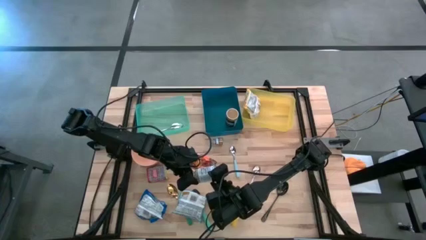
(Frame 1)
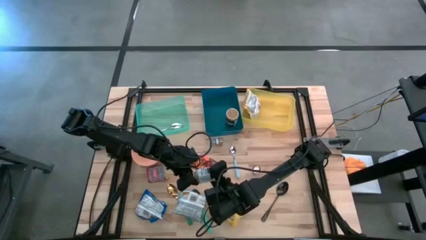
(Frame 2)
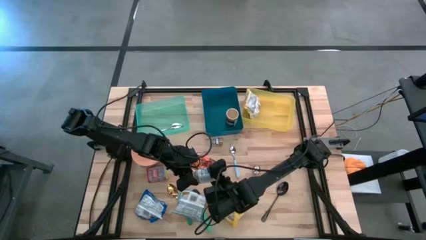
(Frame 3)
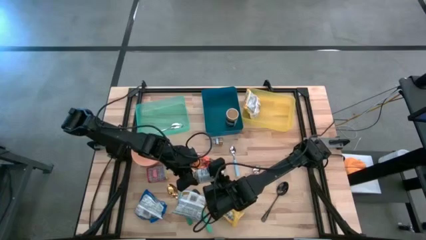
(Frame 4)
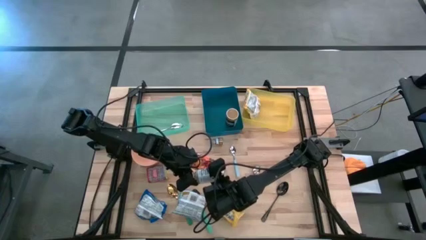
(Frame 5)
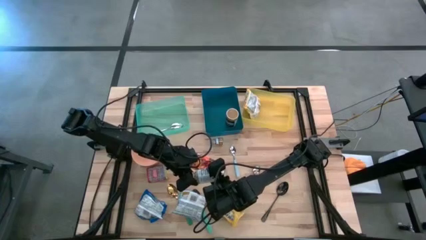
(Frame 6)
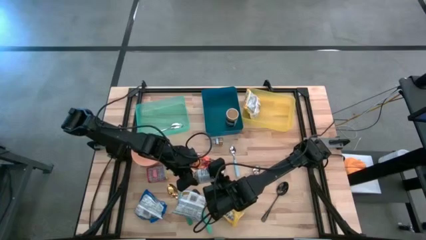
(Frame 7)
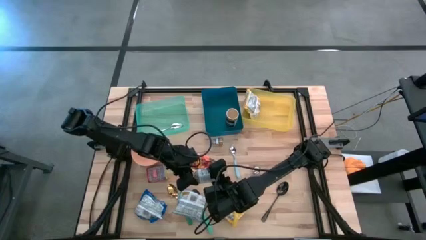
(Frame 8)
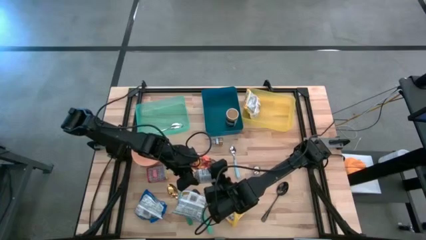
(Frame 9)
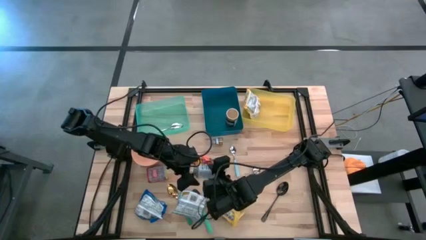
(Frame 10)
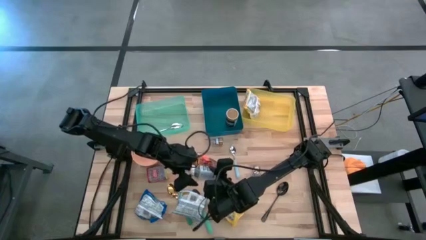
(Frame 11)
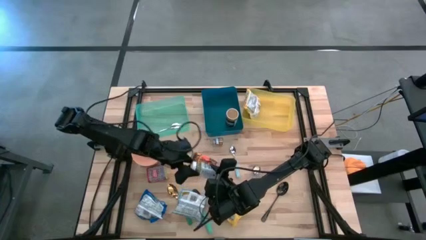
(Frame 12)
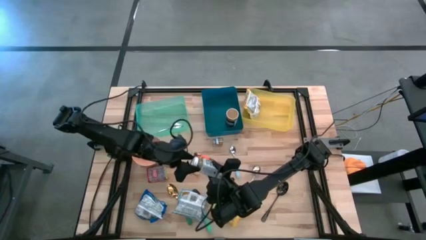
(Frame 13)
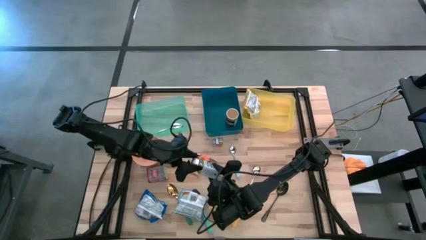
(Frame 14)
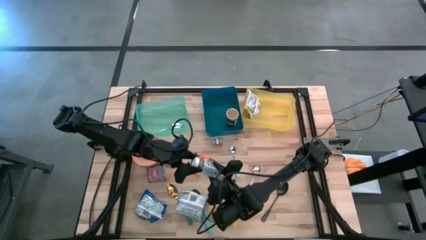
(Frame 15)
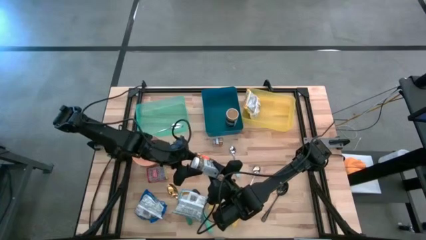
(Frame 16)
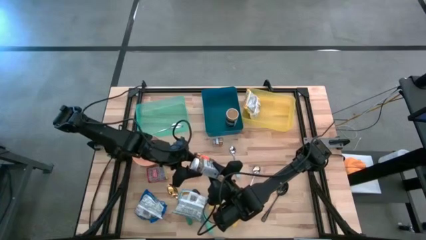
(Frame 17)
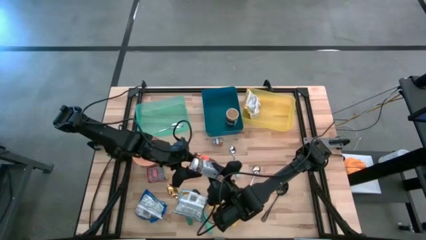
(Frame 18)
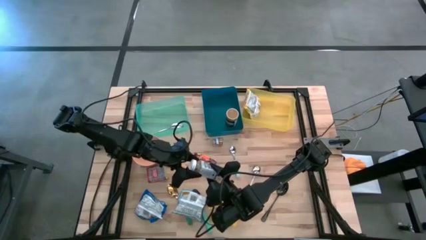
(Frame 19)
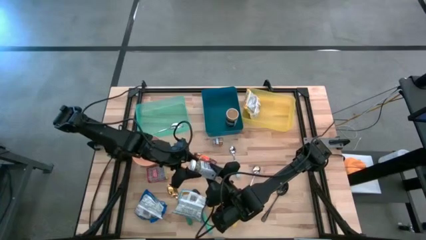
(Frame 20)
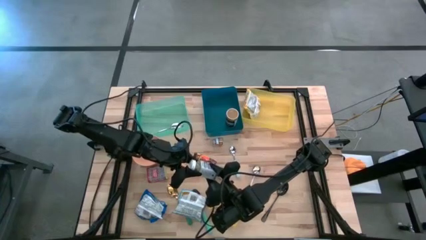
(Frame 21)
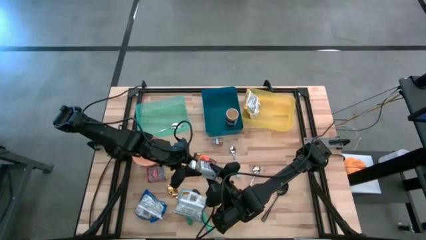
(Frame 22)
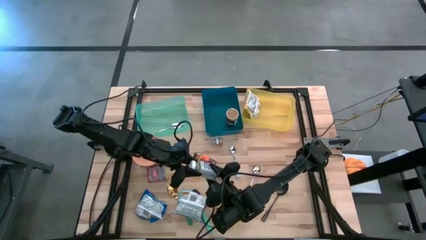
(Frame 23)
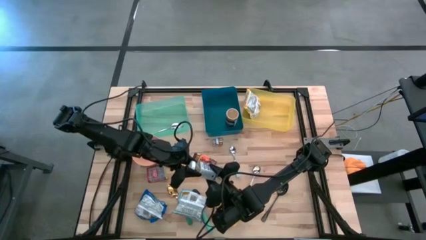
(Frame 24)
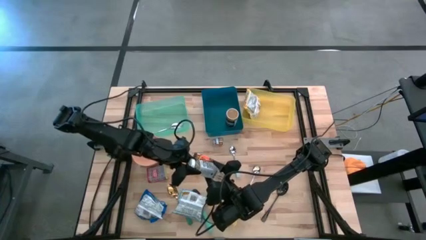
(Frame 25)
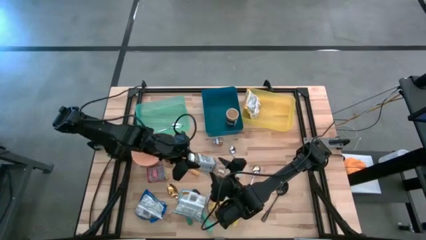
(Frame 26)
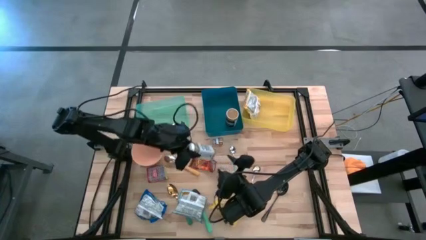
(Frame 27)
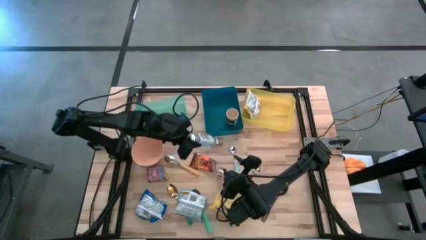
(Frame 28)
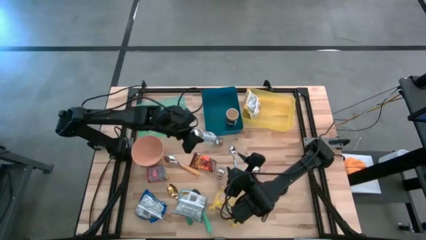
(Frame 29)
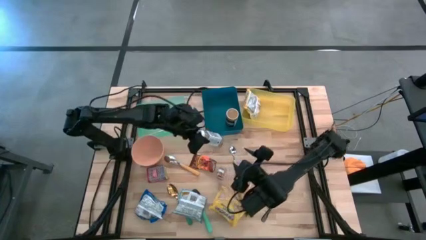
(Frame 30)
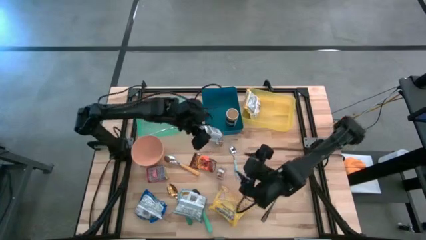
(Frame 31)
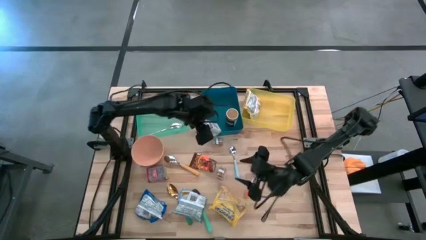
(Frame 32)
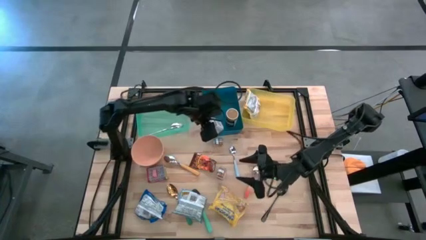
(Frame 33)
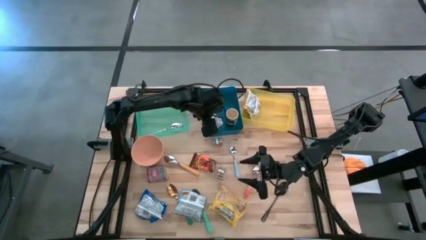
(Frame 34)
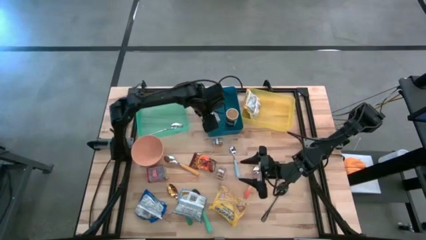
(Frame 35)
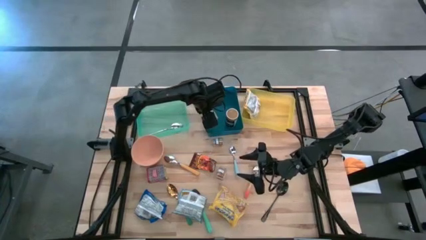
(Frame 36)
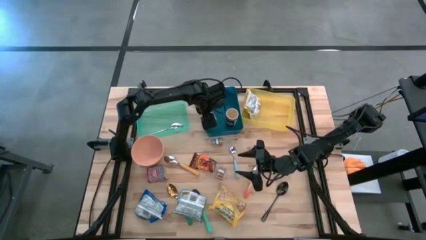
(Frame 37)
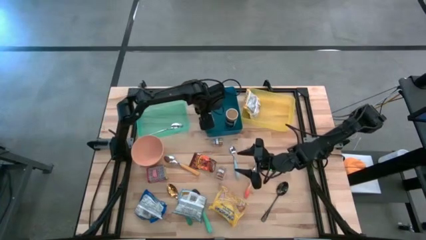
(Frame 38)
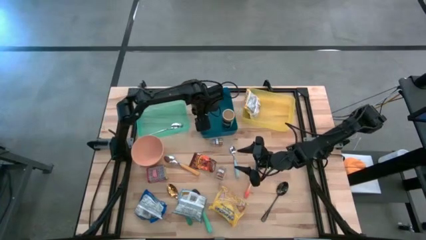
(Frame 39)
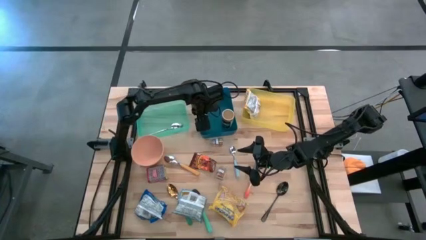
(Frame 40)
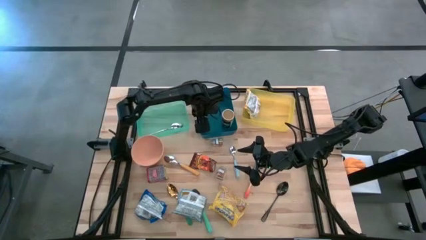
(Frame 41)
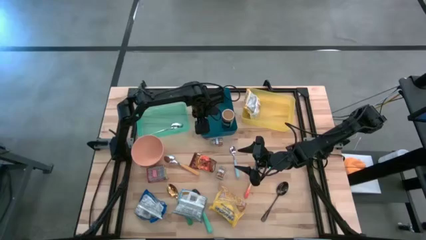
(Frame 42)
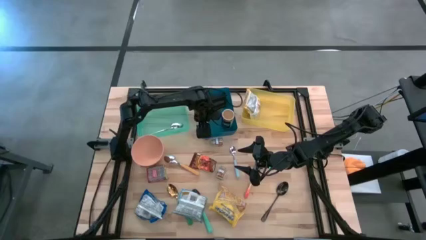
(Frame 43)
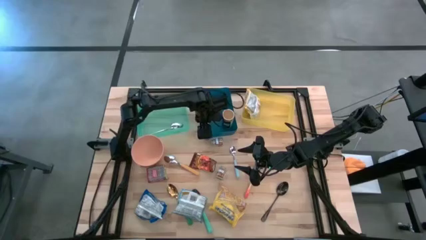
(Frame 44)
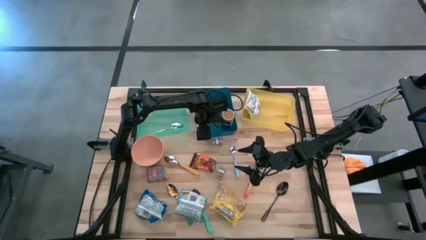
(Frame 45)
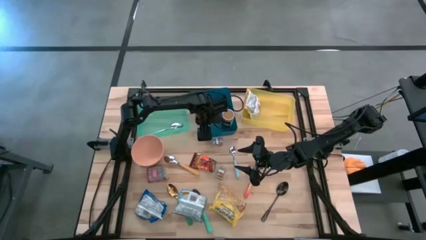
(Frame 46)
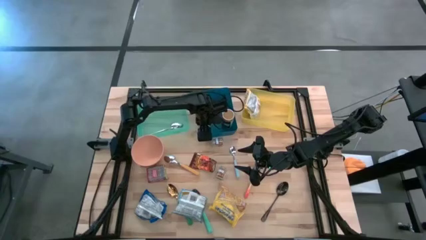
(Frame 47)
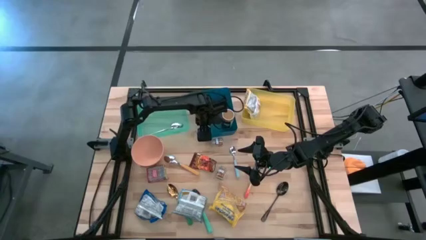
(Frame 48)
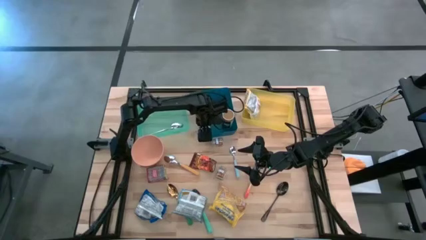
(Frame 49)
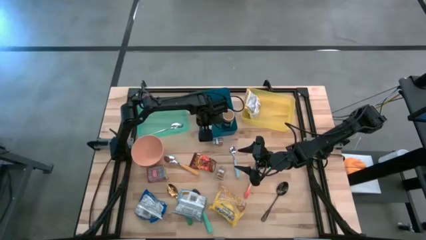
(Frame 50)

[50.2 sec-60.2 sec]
Put the white seasoning bottle into the blue bin

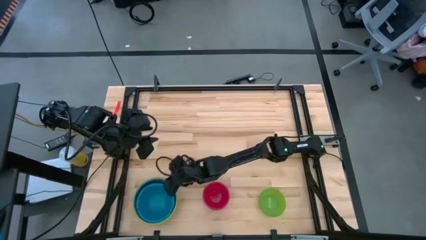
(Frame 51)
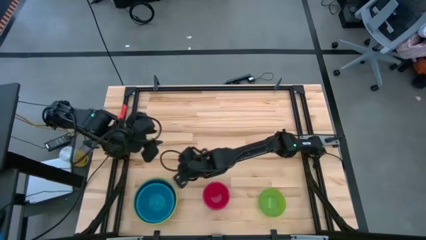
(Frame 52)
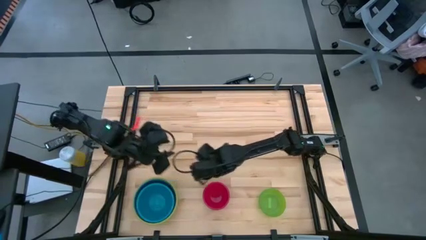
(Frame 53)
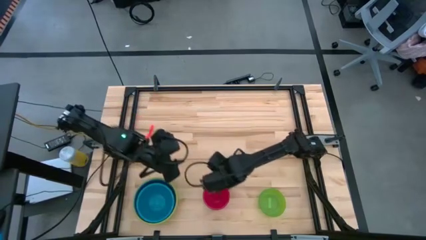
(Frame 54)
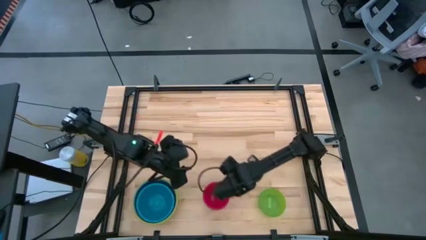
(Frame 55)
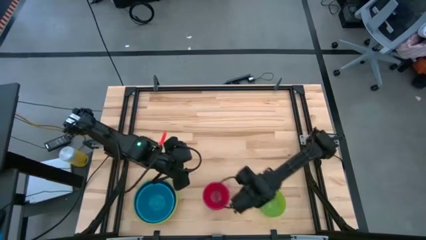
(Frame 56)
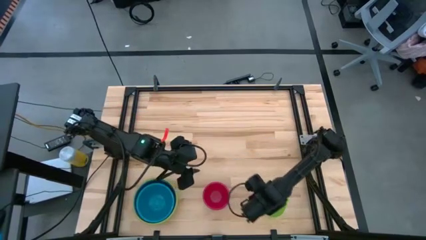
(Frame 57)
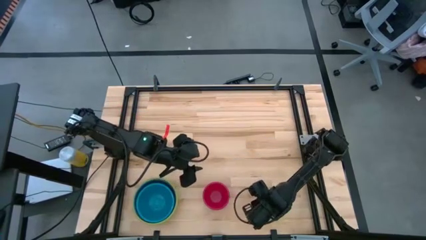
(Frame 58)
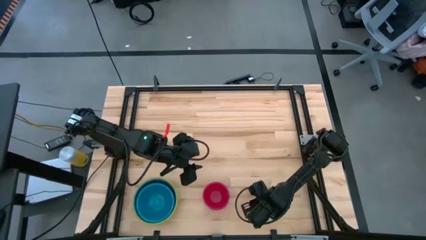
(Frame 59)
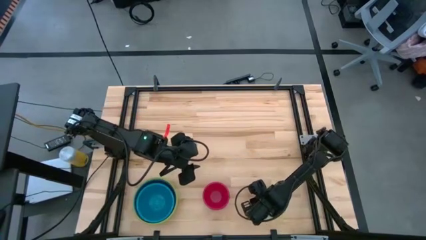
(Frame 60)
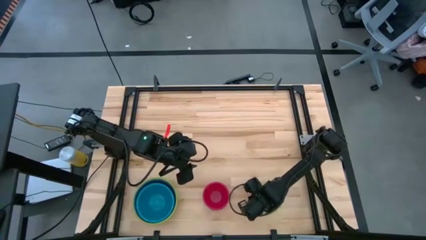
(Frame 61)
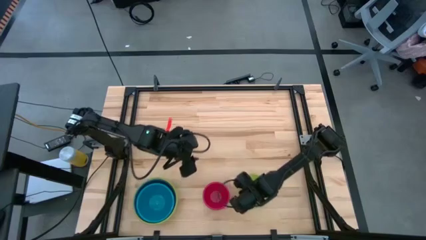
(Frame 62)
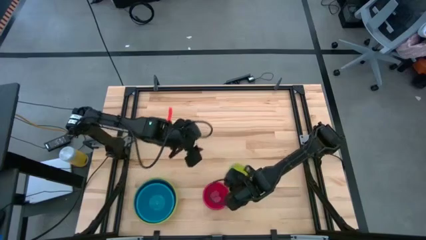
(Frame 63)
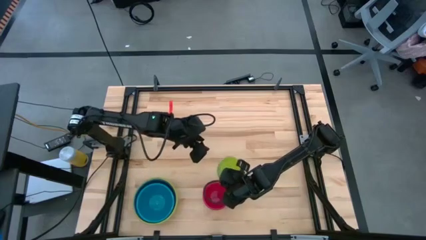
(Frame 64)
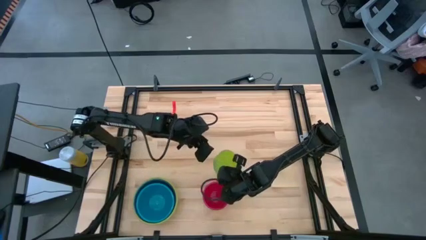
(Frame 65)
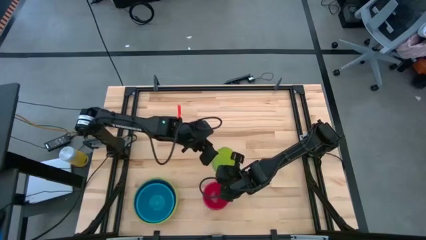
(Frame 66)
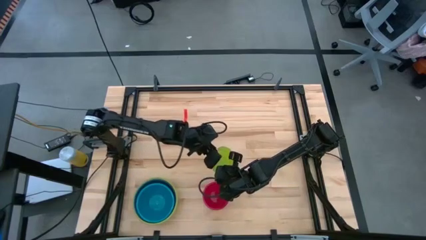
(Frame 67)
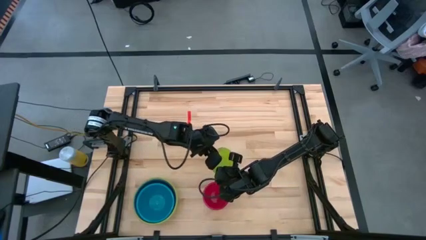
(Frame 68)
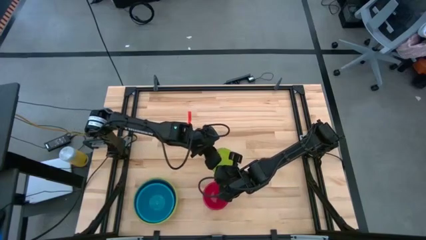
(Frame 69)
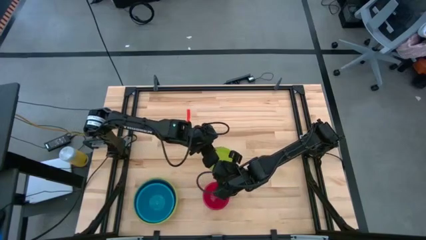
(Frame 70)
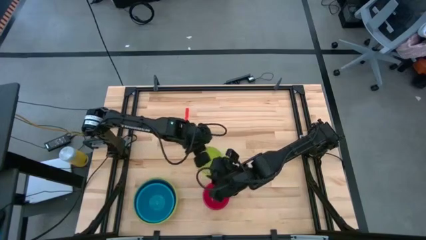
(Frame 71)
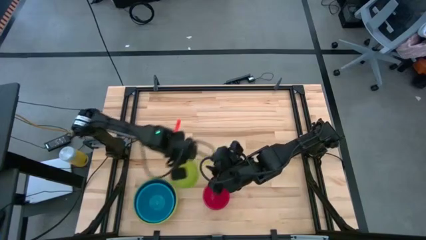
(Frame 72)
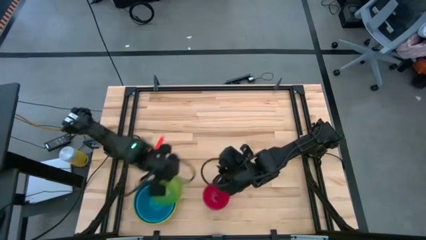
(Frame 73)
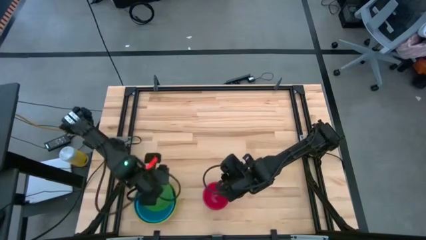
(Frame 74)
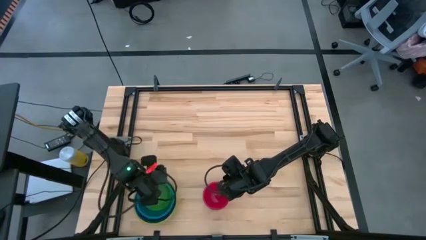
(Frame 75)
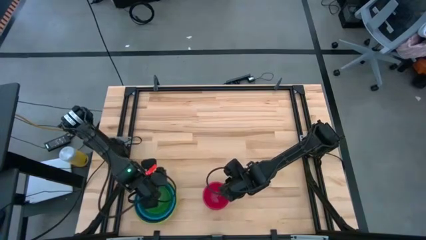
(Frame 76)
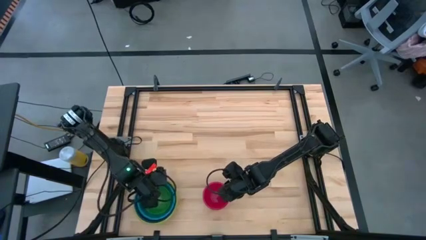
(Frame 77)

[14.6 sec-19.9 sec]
Stack the transparent green bowl on top of the blue bowl

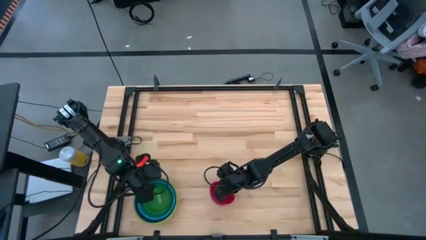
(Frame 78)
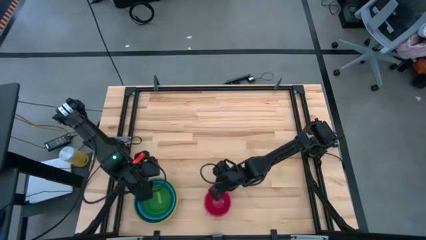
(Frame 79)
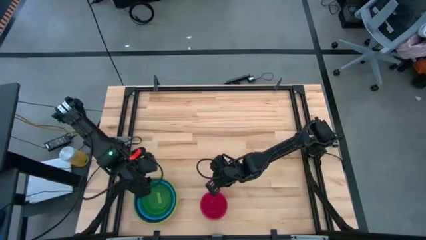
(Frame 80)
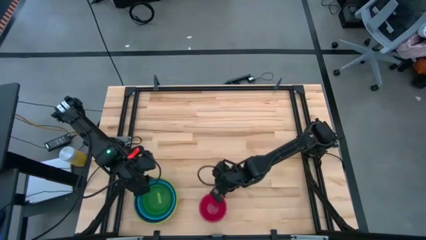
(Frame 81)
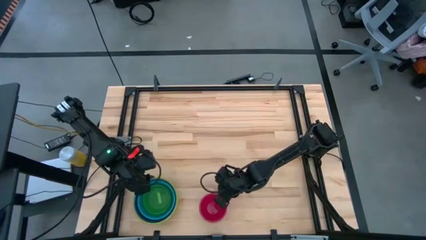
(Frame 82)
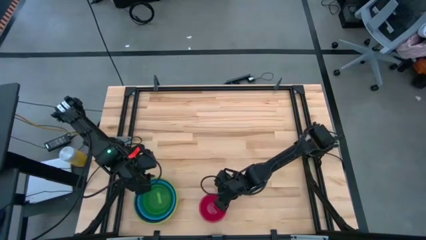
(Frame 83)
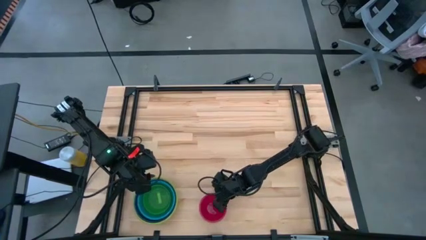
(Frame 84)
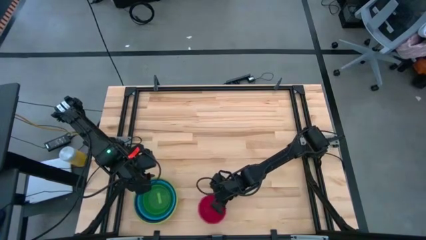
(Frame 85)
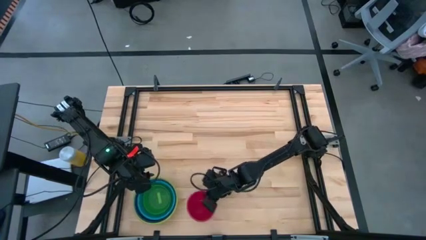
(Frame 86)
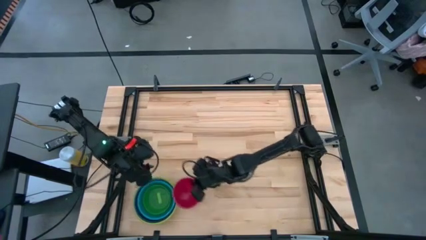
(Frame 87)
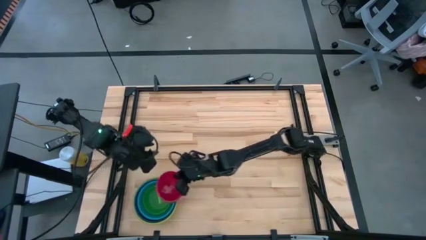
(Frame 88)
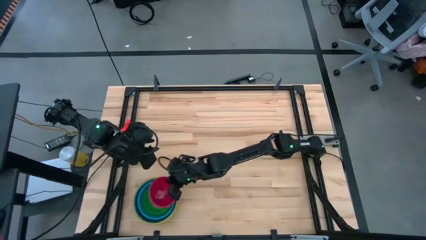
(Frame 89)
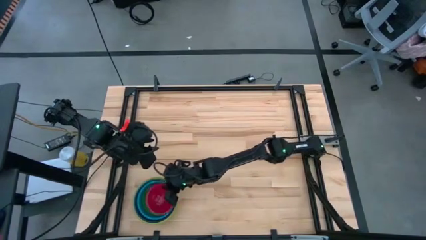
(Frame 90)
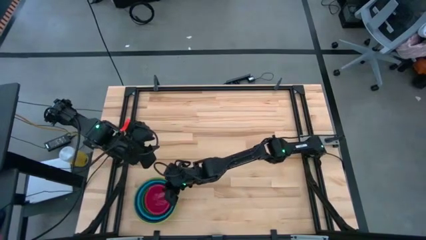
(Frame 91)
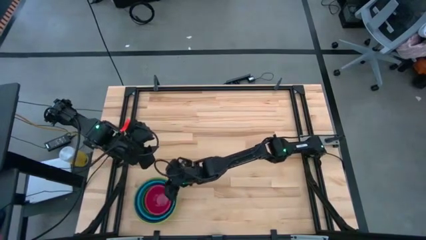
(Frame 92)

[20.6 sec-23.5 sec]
Stack the red bowl on top of the transparent green bowl
